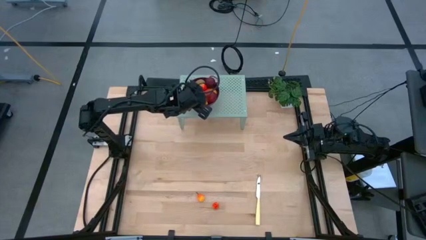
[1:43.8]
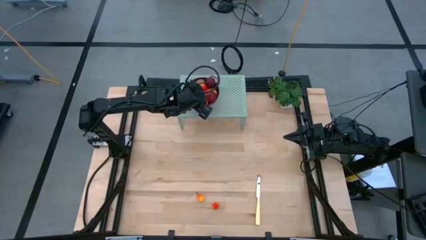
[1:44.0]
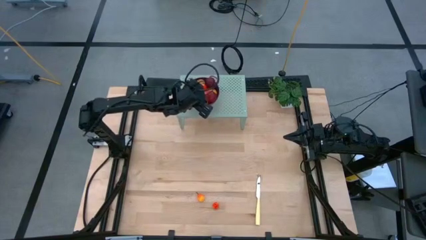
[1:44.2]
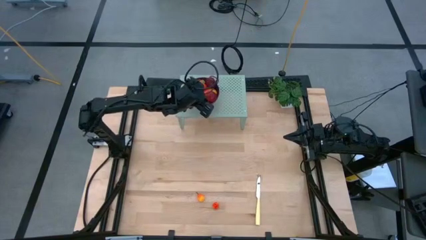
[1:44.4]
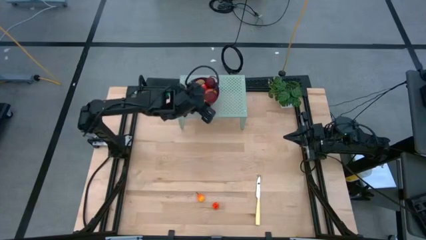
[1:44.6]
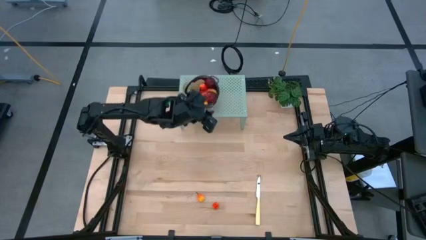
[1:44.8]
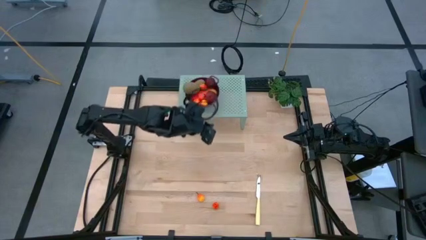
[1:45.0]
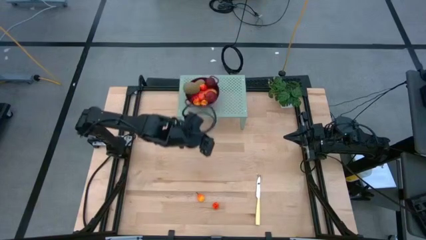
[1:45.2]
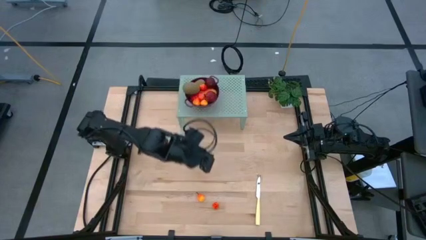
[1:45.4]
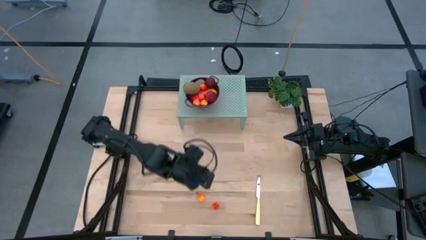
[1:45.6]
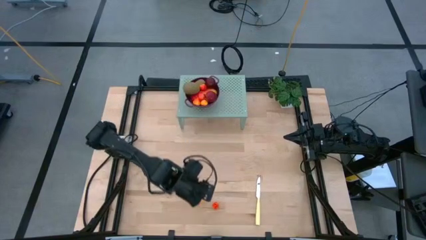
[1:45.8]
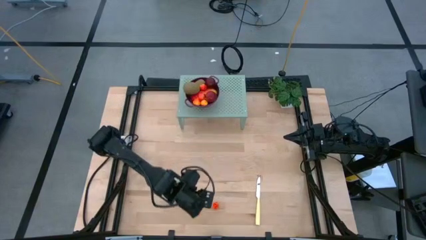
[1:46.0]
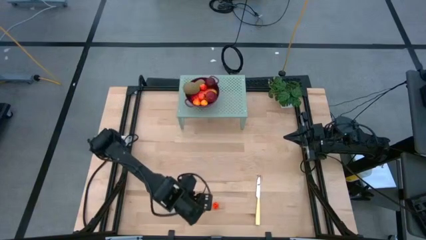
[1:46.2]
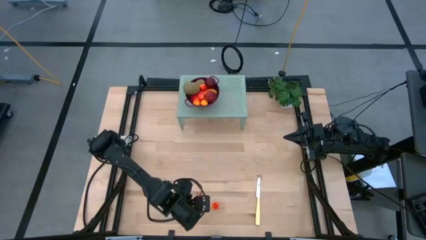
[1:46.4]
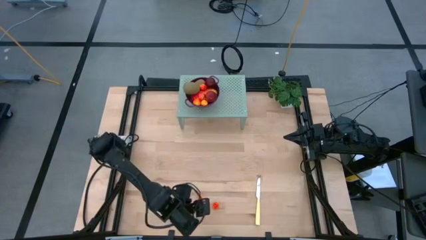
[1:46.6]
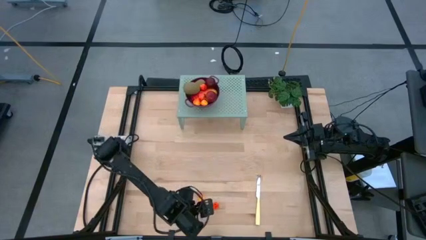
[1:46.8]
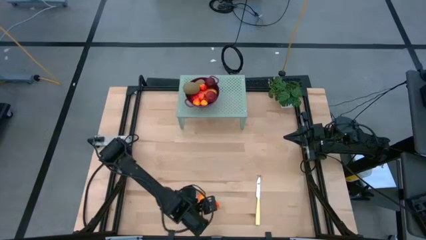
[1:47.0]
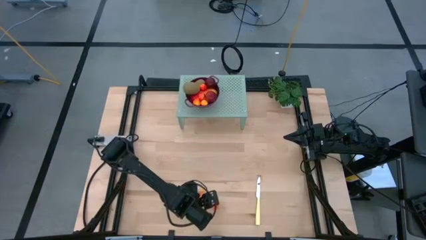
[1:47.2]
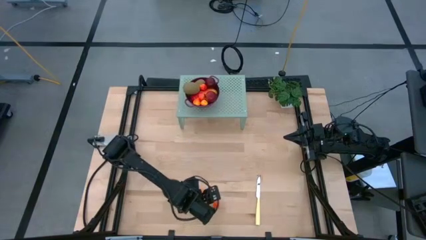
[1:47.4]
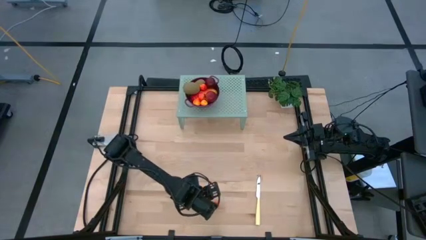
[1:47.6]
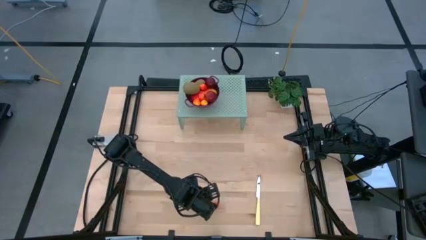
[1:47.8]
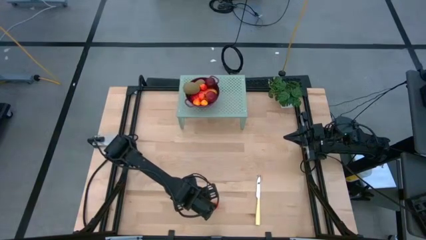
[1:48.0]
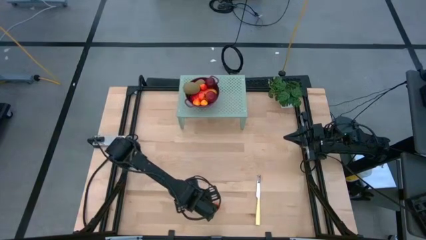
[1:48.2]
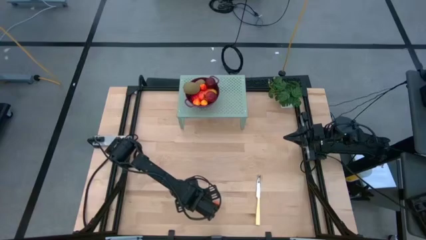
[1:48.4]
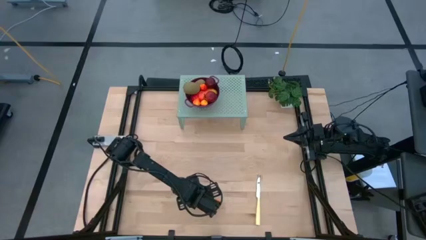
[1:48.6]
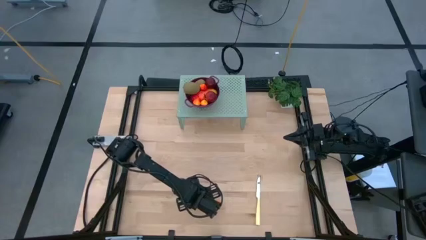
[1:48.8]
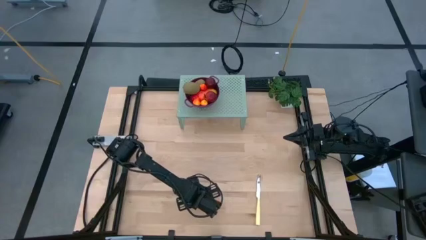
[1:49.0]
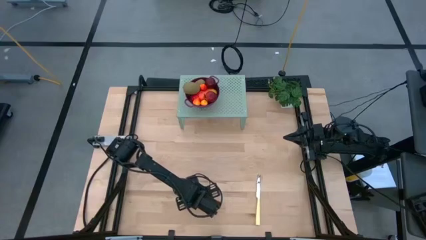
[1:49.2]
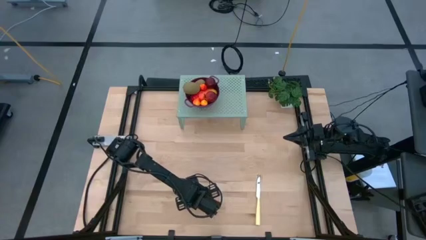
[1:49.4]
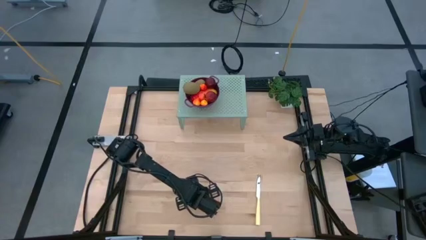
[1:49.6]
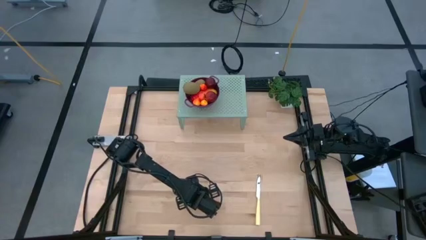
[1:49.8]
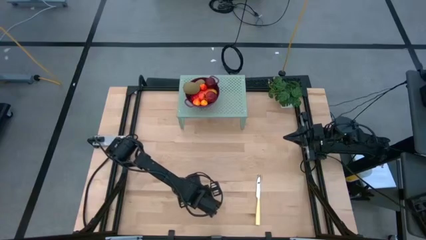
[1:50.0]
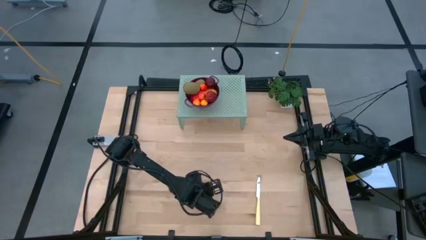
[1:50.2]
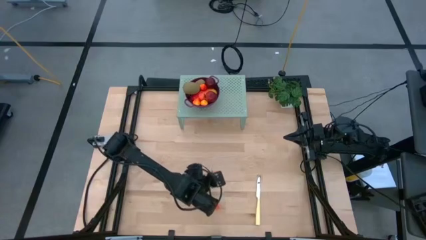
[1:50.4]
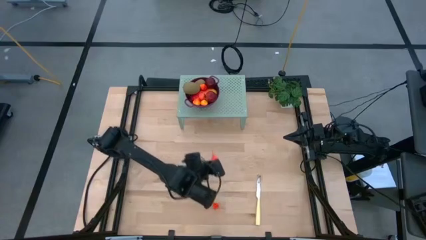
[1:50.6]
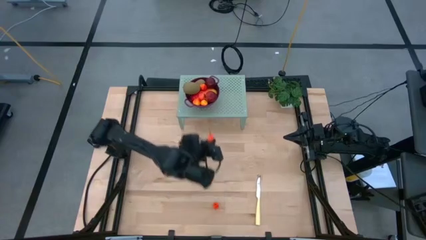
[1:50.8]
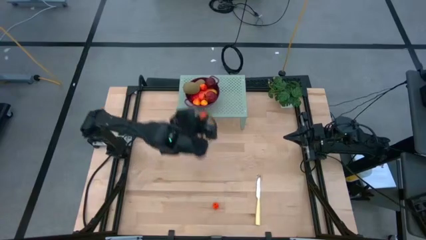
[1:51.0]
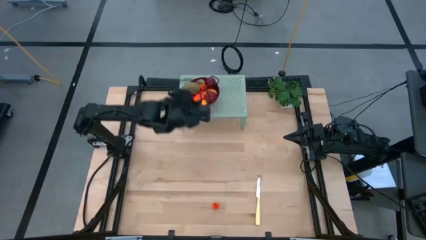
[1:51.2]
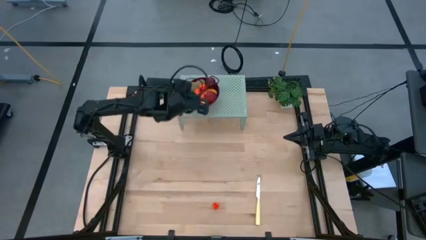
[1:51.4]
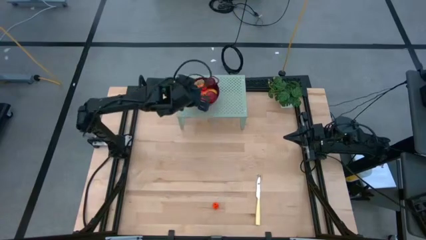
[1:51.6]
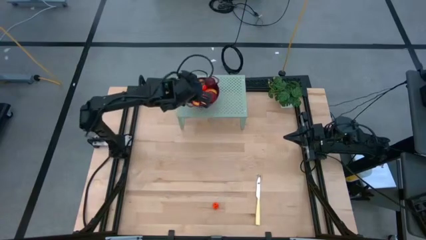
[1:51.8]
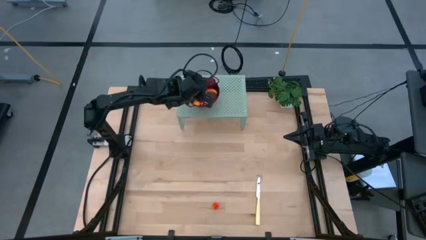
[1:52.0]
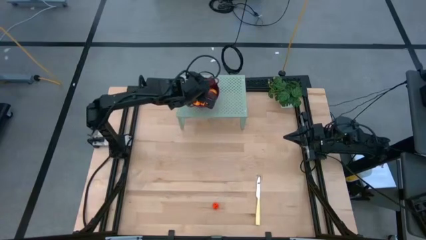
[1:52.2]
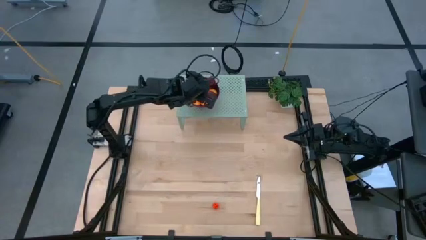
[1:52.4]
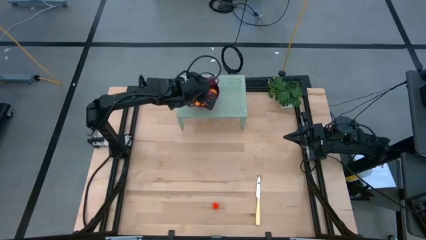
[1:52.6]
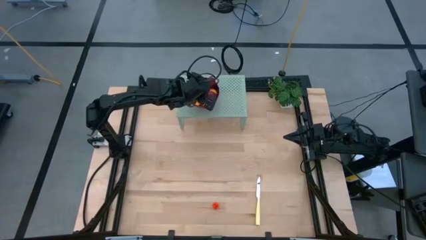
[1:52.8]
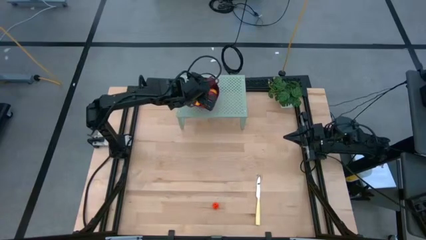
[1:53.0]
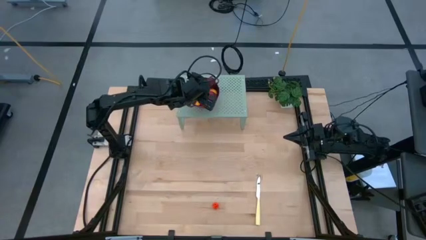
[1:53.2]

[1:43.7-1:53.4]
Task: Pick & Place Fruit
Put the orange peach in the red strainer bowl on the shelf

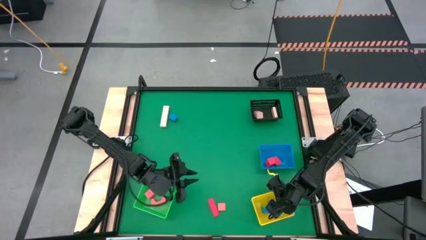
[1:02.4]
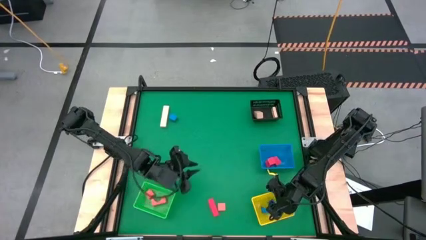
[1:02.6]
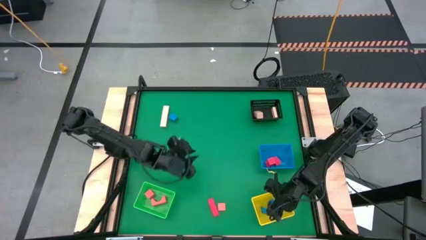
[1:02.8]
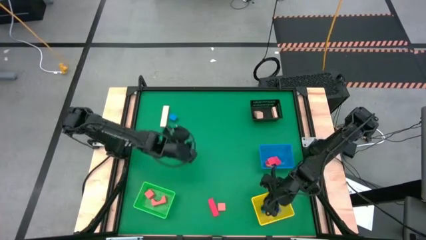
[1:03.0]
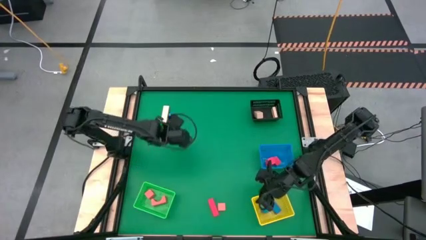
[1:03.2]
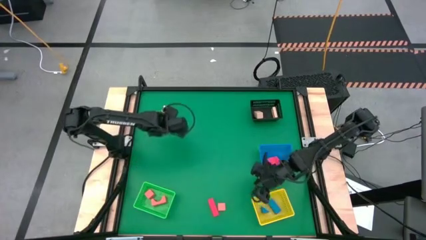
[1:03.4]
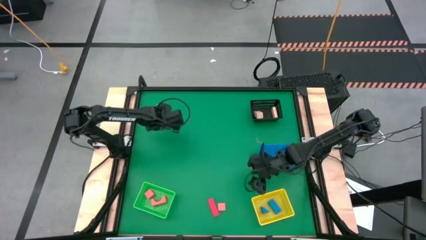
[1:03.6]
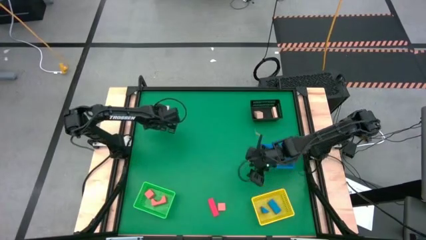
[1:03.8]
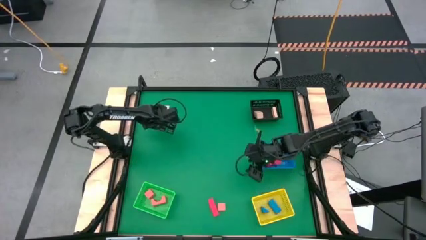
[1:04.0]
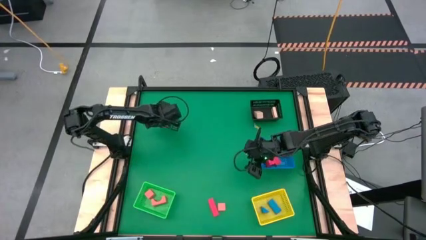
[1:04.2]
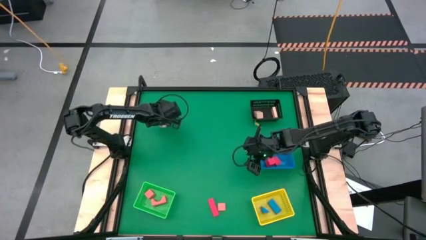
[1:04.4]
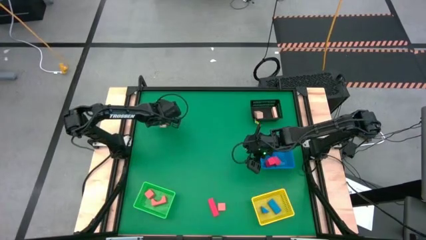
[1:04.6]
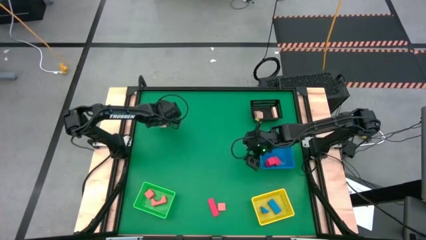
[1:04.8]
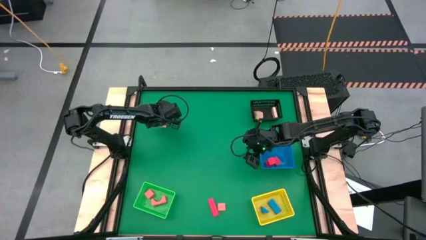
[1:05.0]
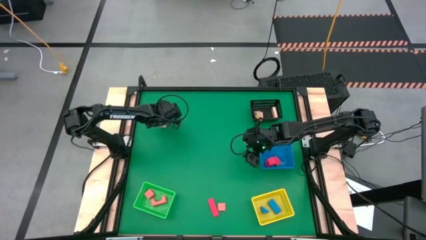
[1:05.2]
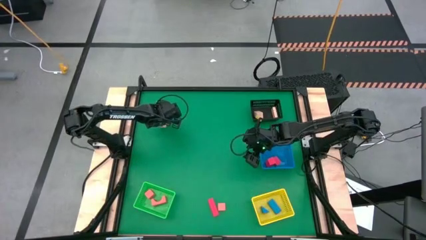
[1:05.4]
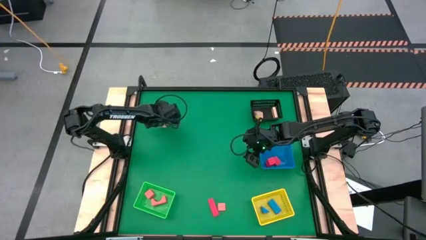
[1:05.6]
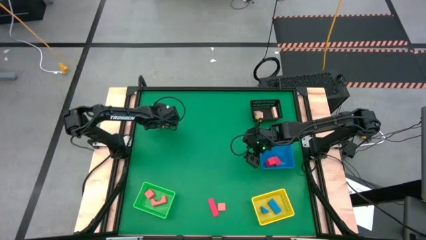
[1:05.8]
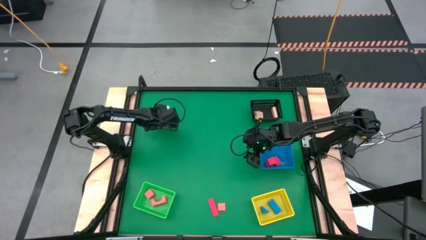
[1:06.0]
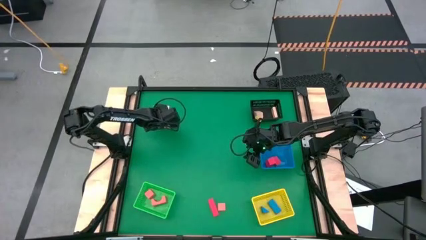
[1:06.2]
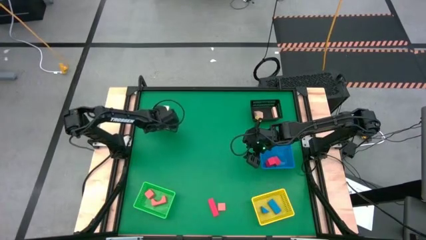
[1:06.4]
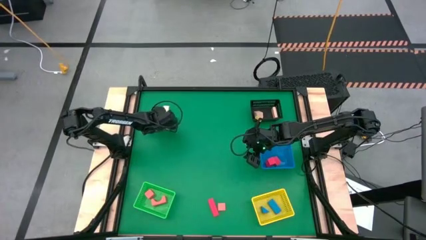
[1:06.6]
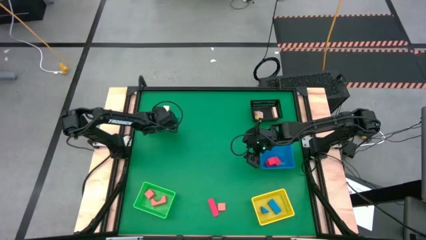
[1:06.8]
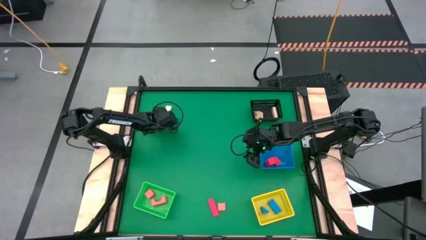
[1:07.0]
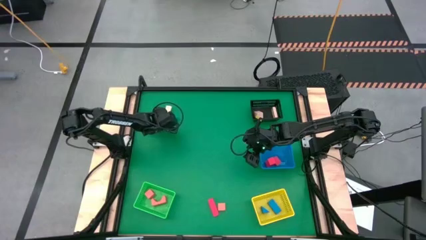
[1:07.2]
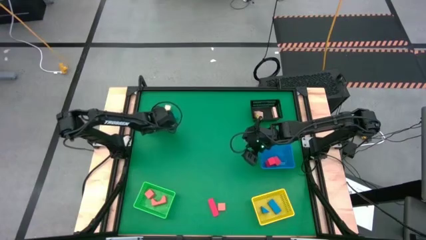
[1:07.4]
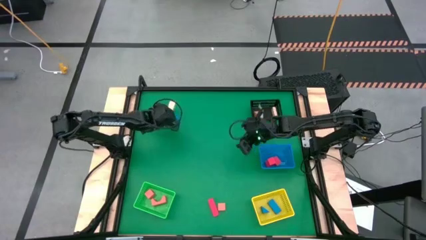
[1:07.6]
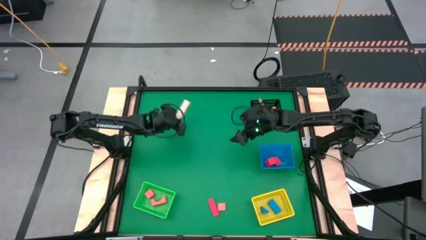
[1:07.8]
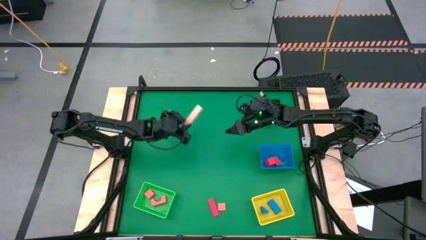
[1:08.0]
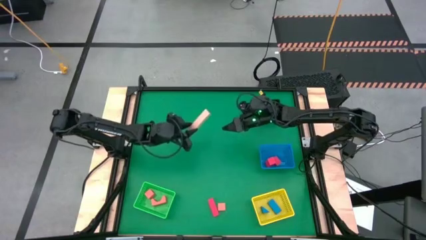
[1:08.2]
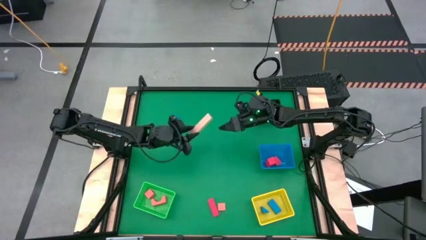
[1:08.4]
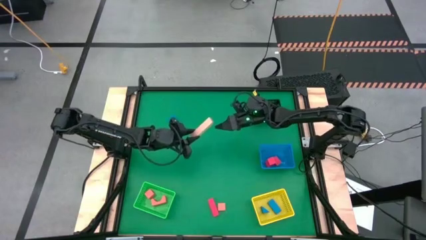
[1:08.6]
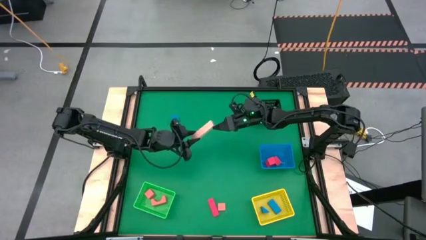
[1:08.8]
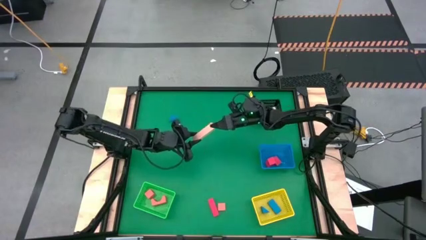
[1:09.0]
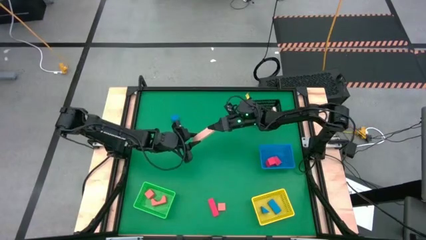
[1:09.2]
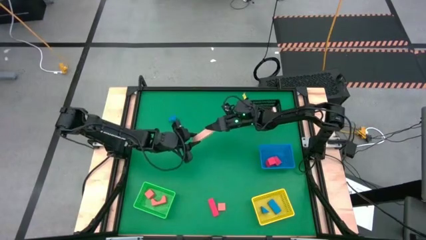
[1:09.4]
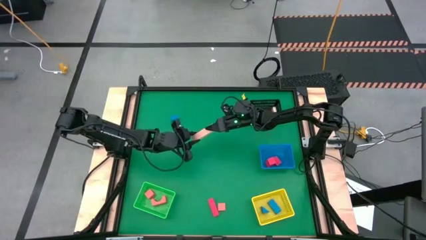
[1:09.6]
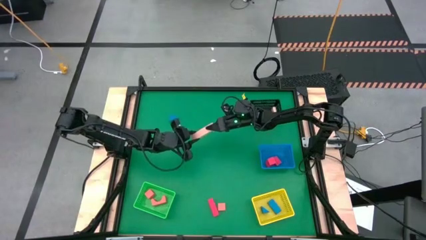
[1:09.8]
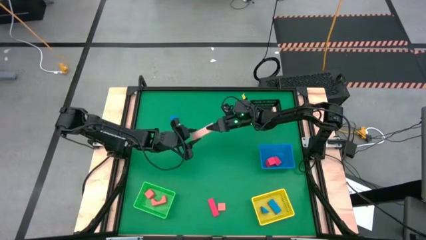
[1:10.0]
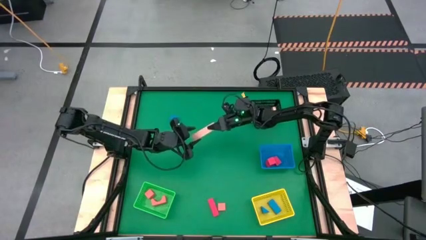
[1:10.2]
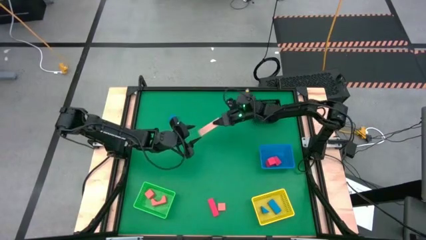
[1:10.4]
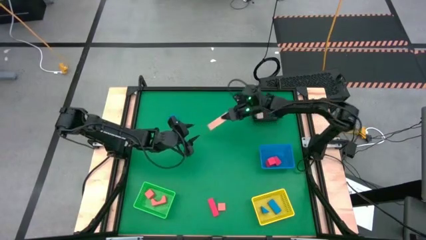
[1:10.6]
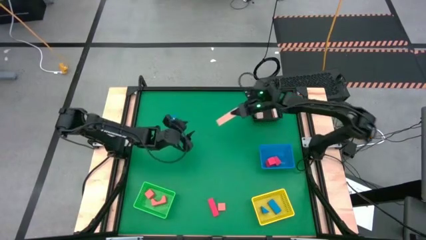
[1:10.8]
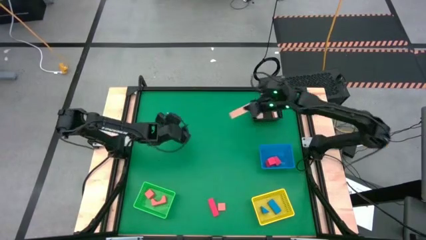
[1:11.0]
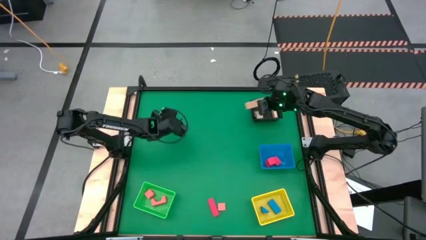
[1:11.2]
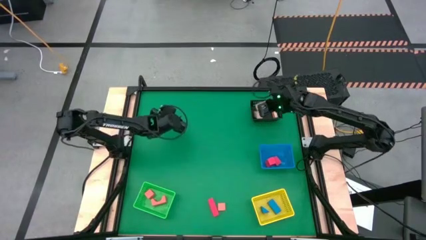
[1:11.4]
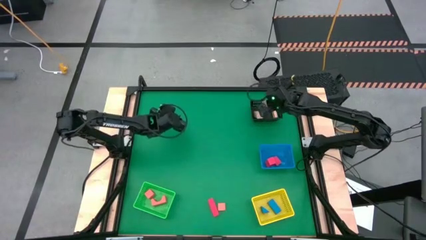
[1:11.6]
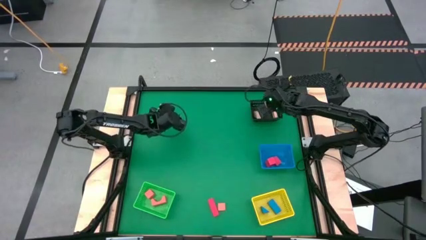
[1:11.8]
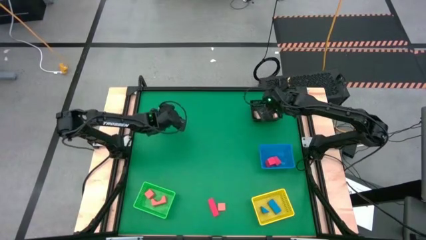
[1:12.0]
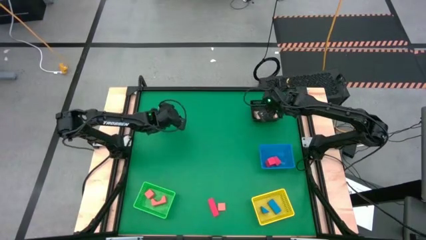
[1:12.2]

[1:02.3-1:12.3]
Task: Sort & place blocks by color
Put the brown block into the black bin
